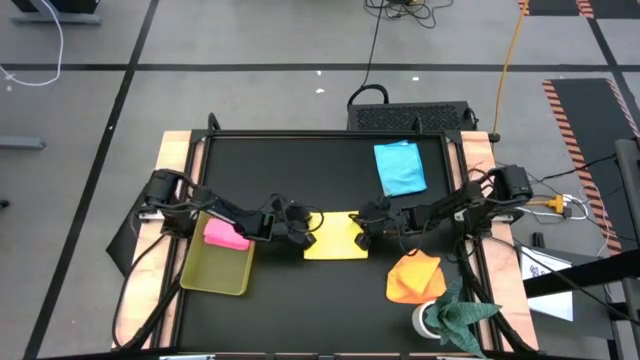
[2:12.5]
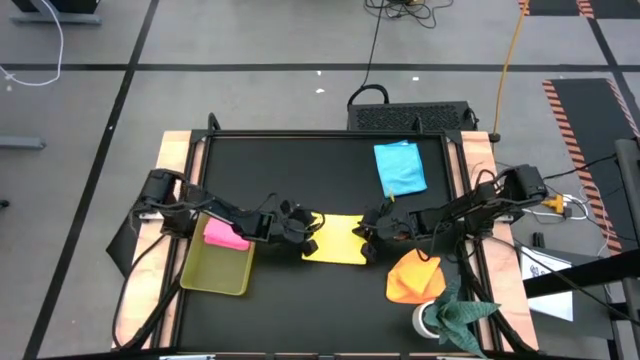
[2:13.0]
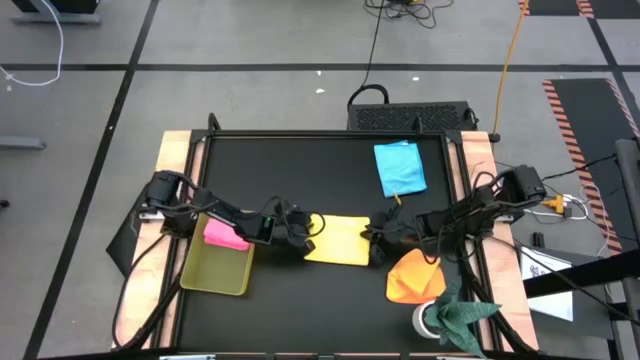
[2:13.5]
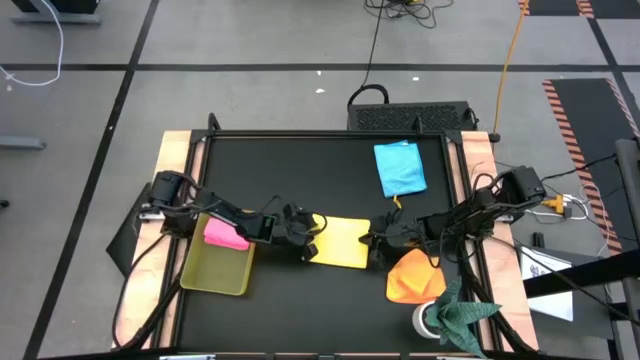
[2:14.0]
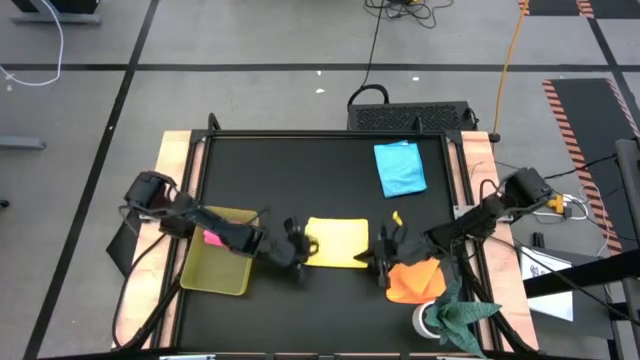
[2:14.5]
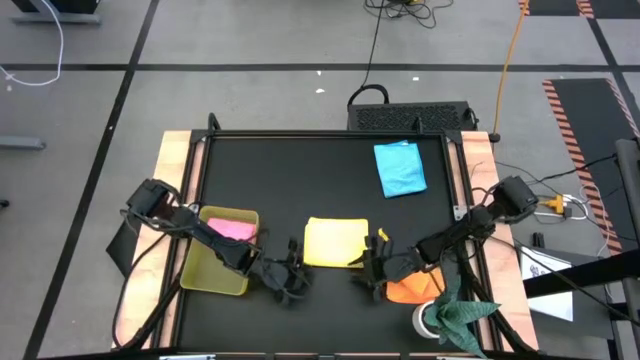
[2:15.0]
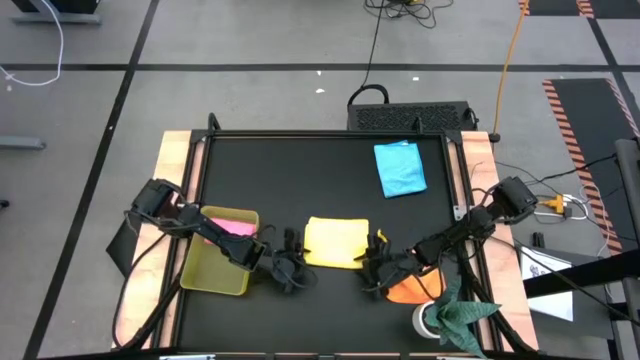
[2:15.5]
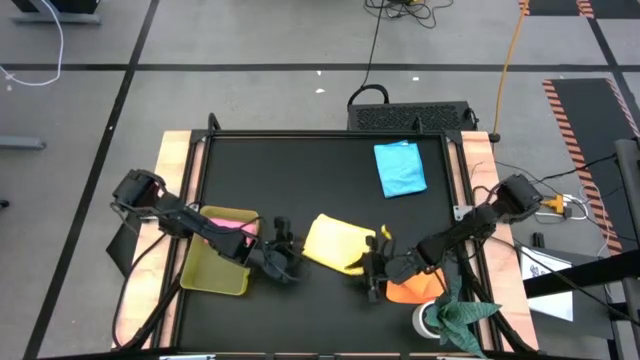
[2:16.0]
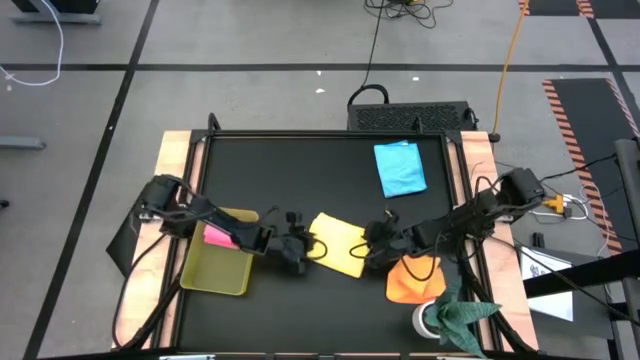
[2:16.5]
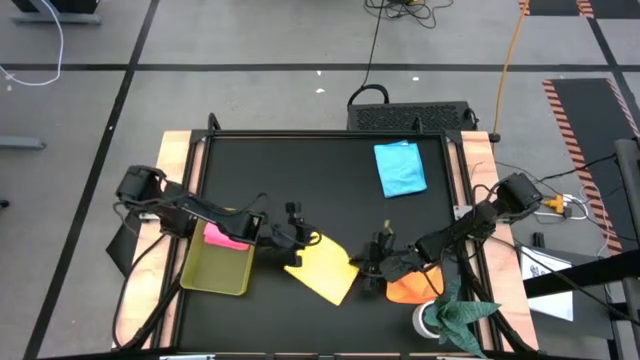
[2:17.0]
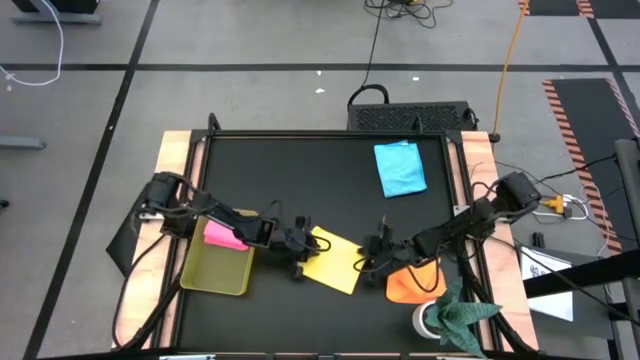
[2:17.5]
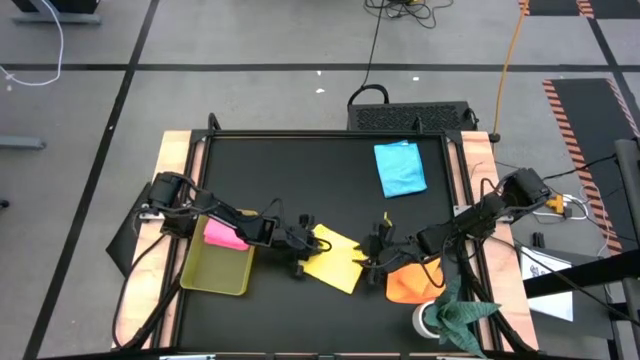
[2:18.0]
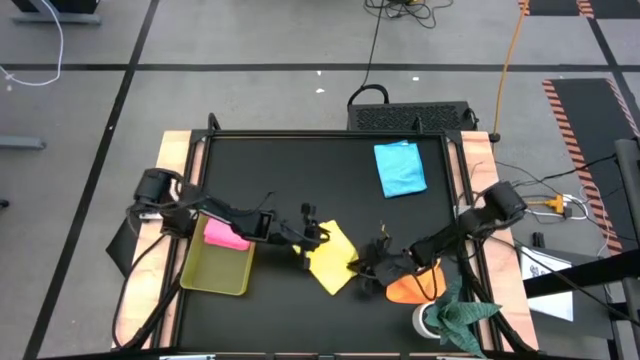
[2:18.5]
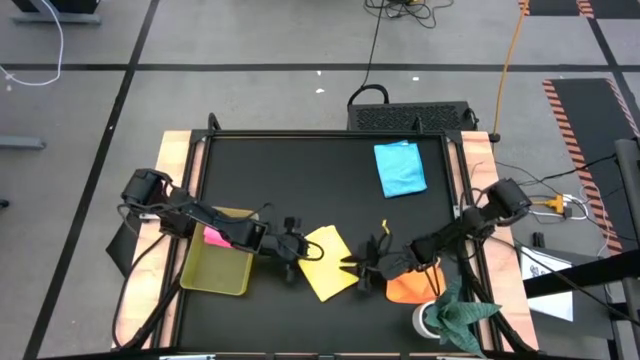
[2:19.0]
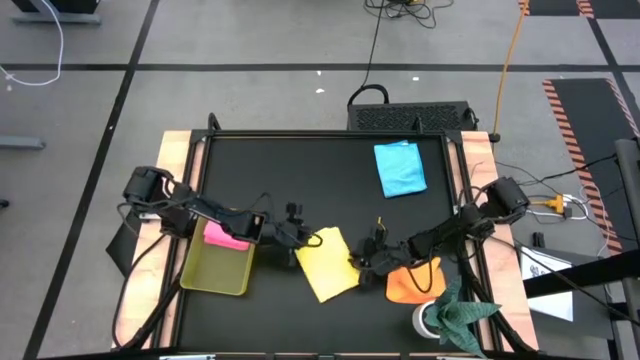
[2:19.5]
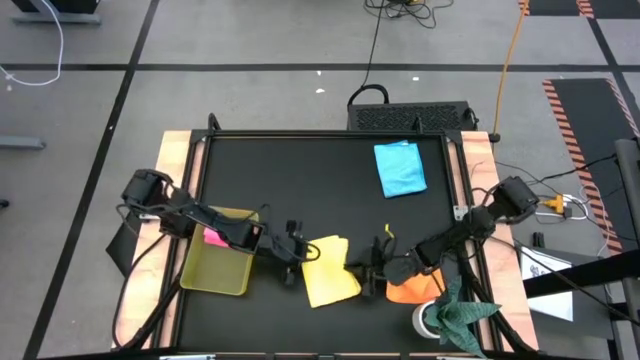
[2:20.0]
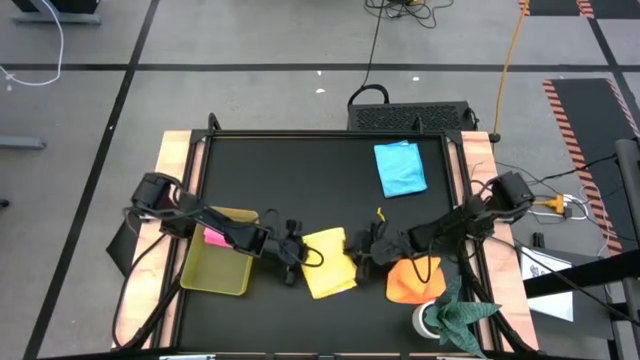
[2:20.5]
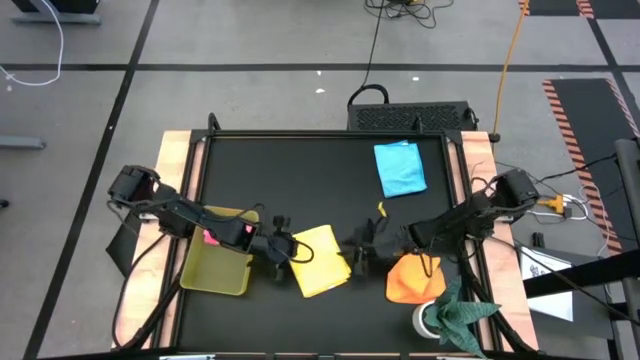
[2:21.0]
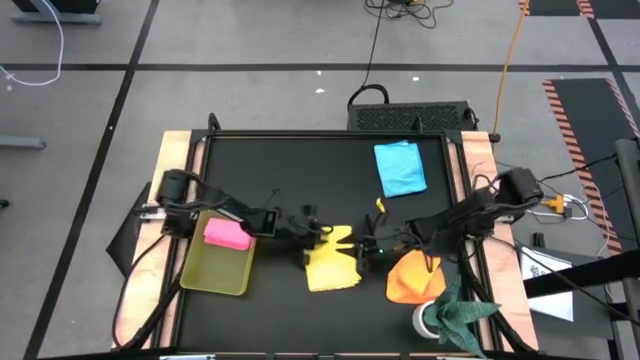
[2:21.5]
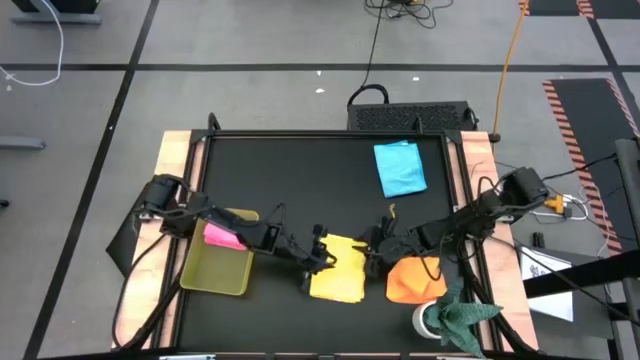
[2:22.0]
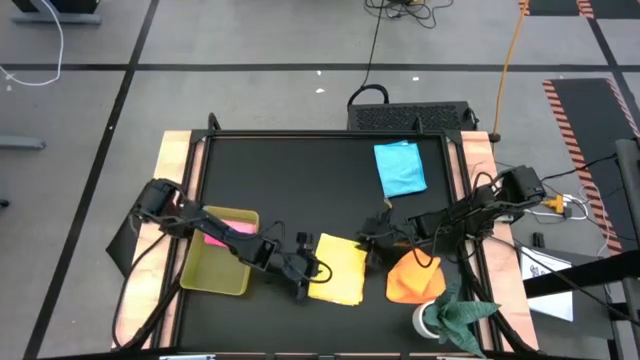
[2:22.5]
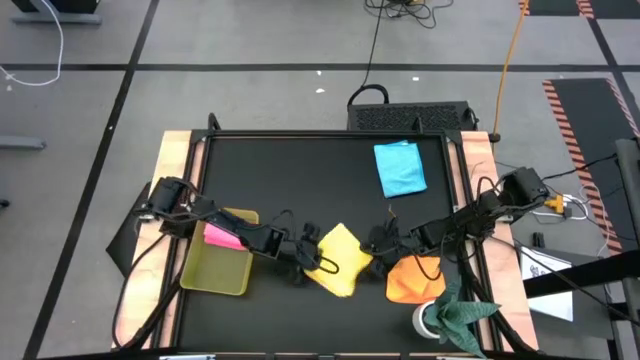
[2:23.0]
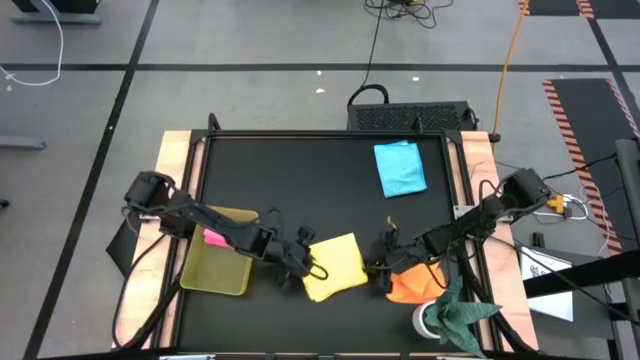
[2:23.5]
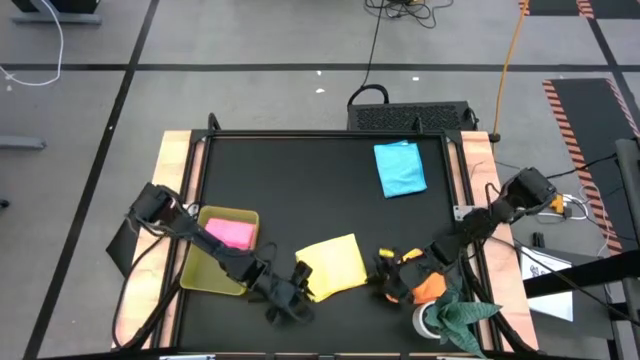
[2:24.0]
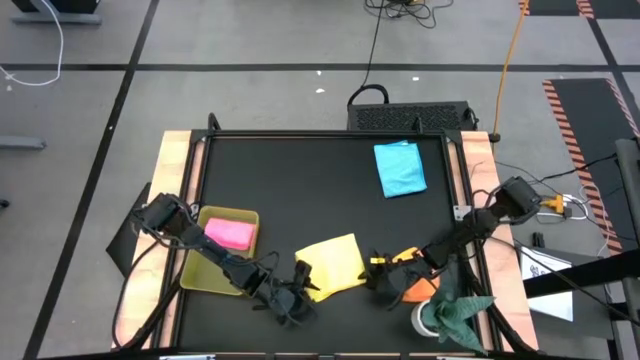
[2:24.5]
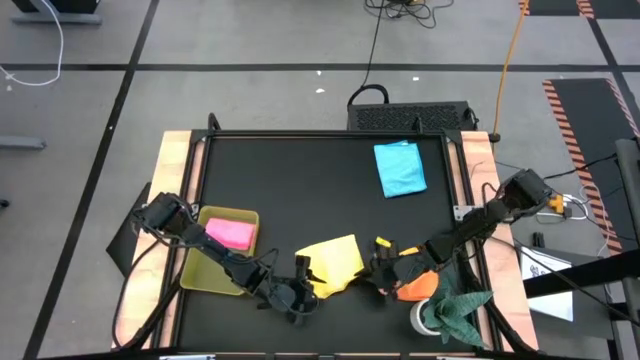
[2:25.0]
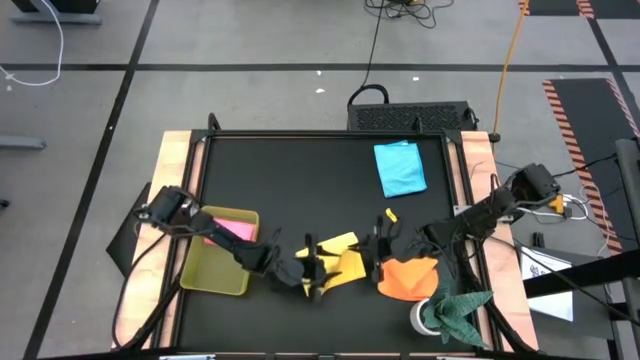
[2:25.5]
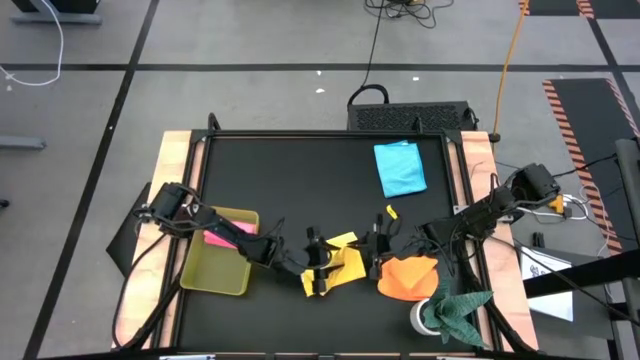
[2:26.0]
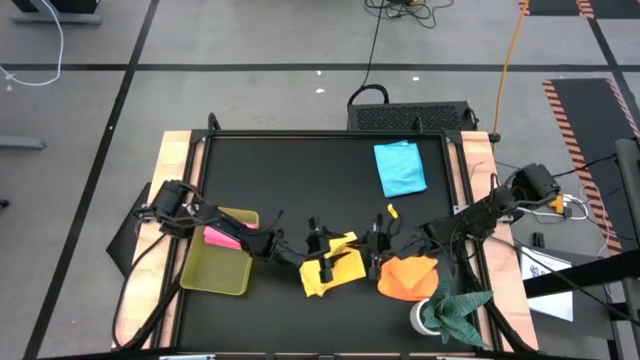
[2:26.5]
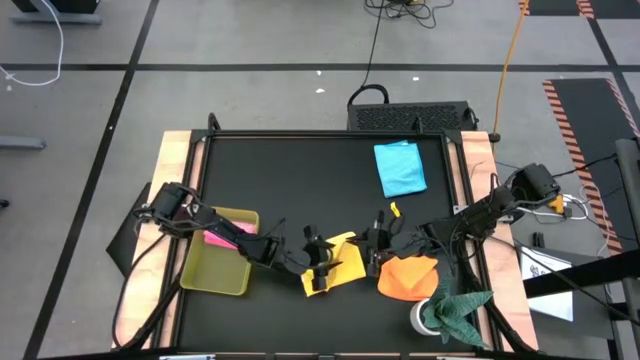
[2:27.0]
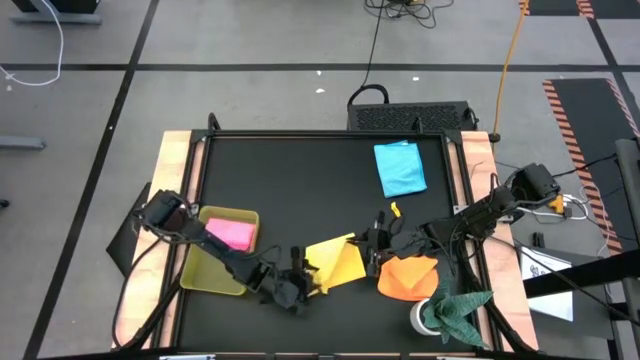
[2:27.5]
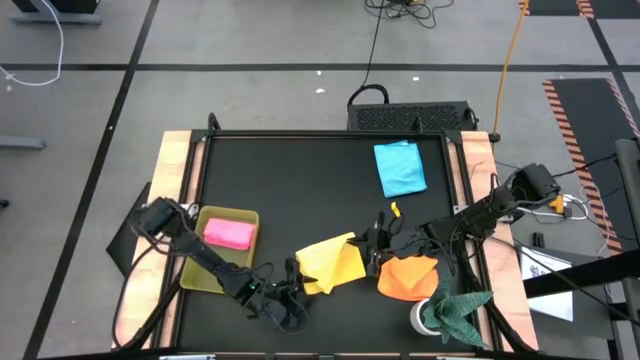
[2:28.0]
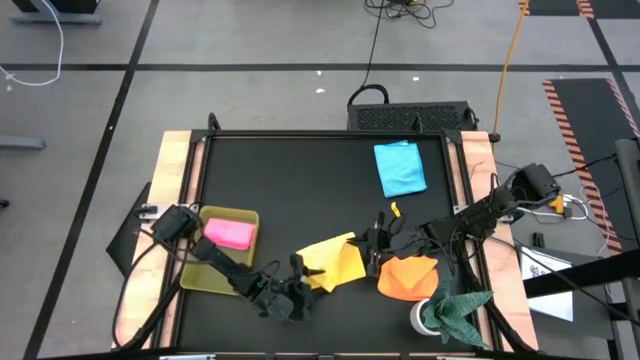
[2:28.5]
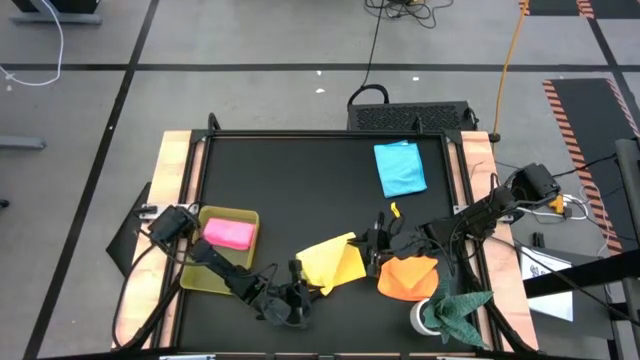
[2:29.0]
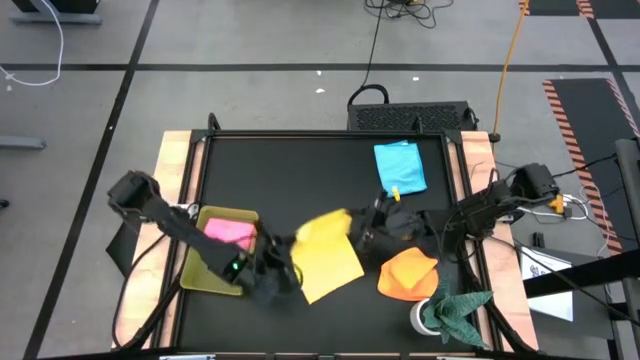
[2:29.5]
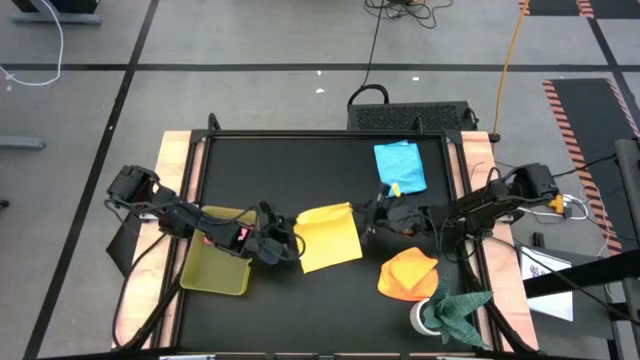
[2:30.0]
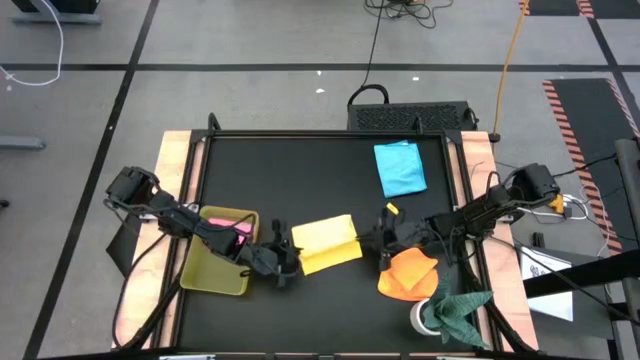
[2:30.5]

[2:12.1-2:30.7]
Task: Fold microfiber towels
Fold the yellow microfiber towel

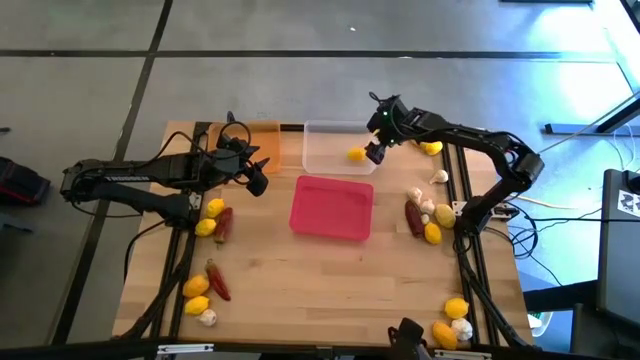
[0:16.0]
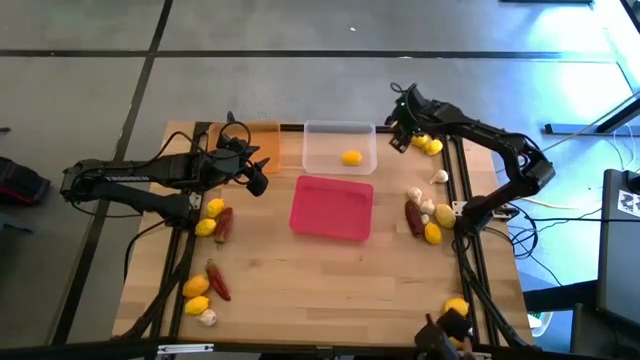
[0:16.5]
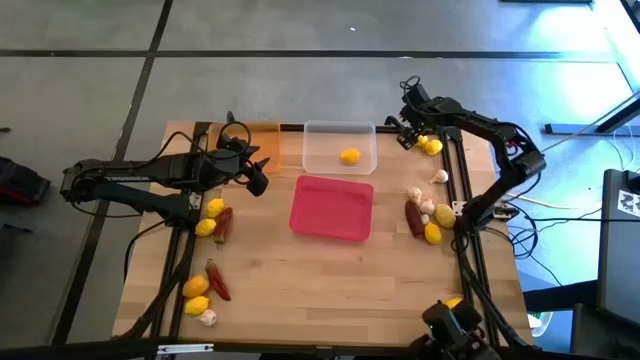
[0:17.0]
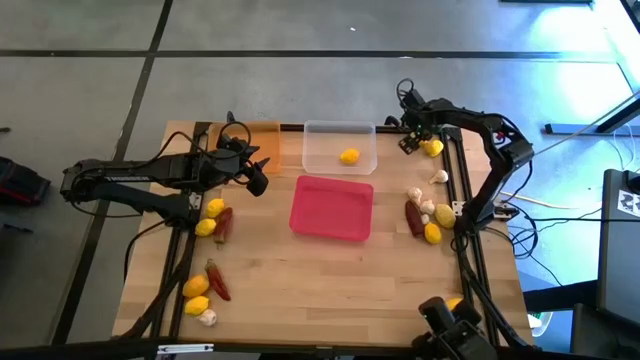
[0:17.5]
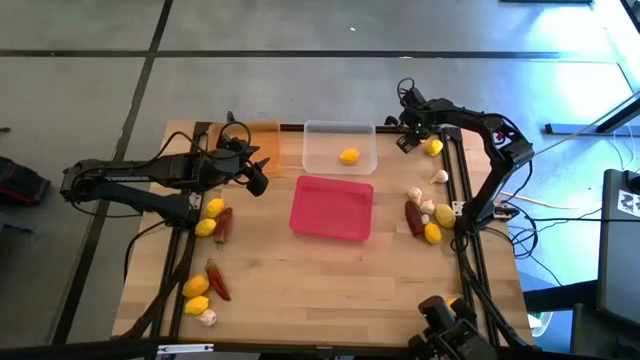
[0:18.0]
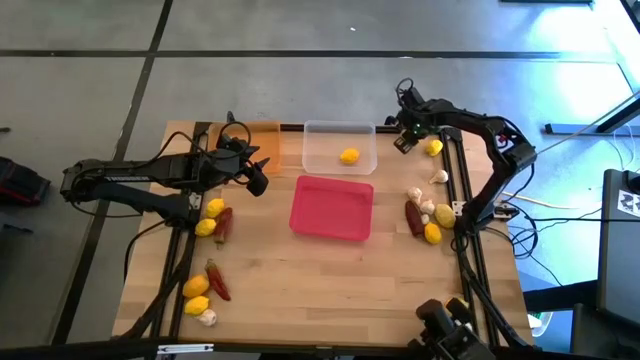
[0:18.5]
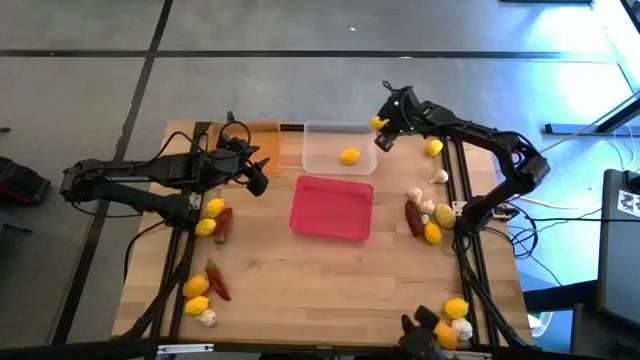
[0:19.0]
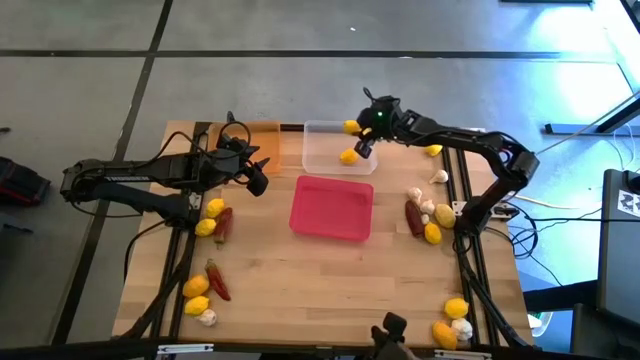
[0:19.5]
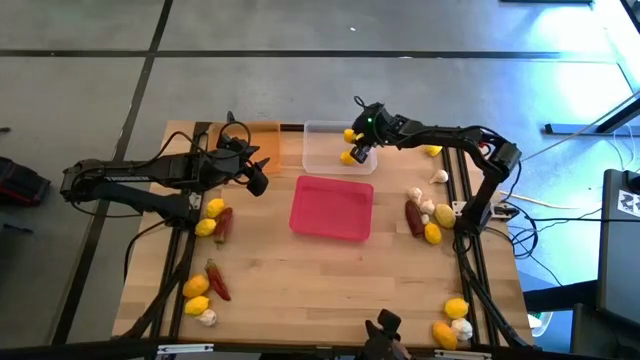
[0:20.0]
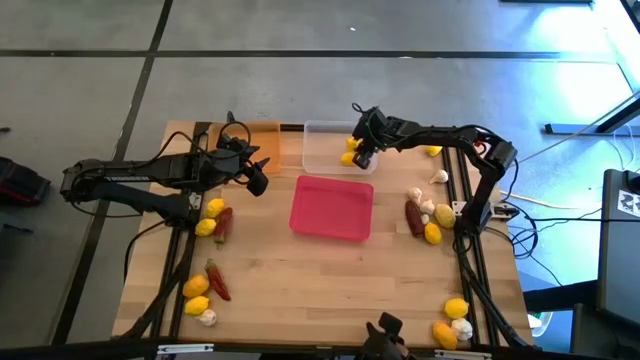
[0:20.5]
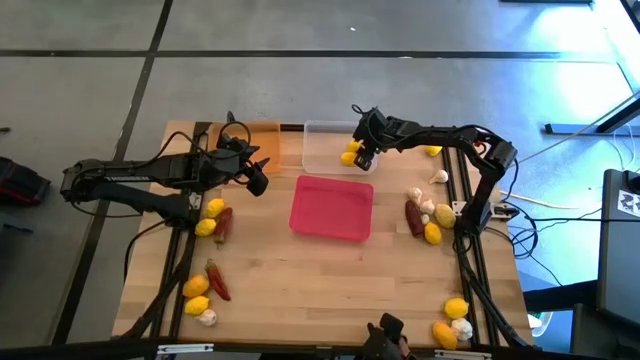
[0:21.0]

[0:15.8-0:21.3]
Task: Sort produce into baskets
Put the yellow lemon in the transparent bin
